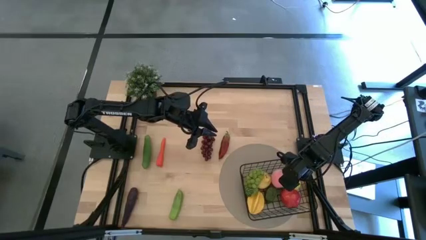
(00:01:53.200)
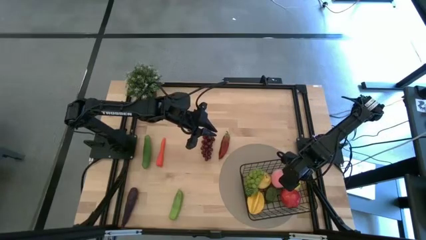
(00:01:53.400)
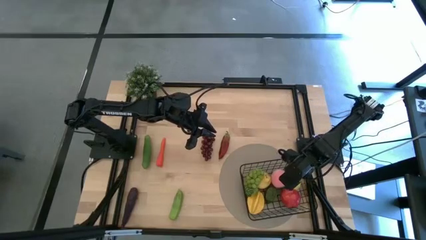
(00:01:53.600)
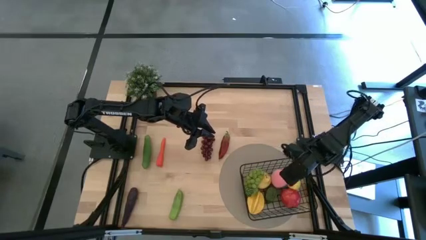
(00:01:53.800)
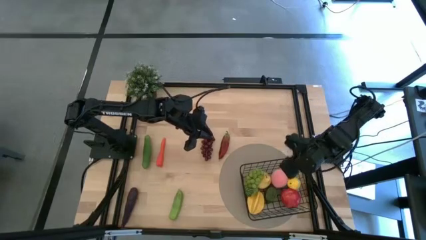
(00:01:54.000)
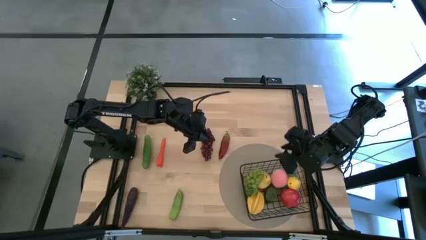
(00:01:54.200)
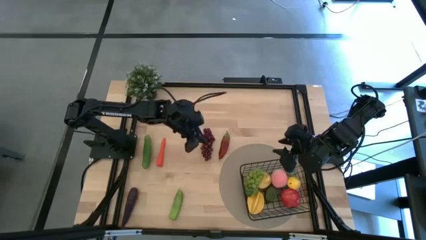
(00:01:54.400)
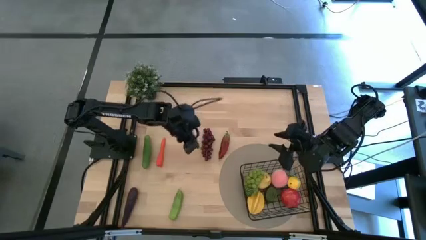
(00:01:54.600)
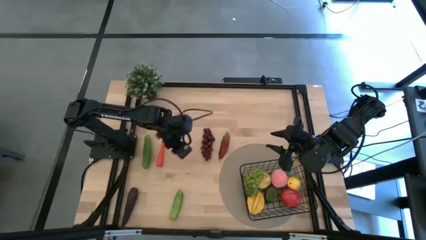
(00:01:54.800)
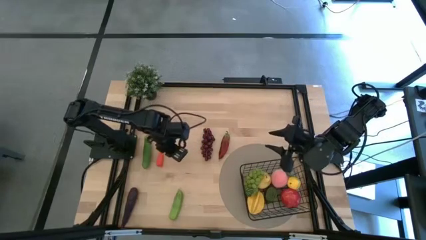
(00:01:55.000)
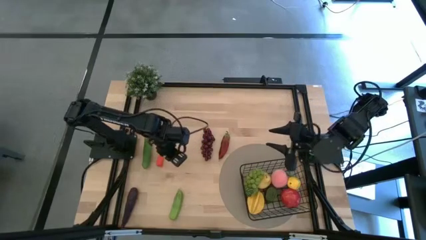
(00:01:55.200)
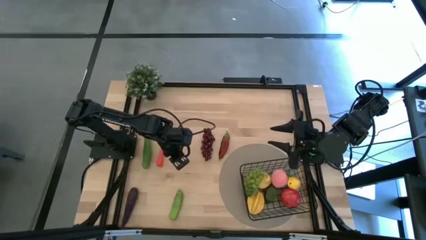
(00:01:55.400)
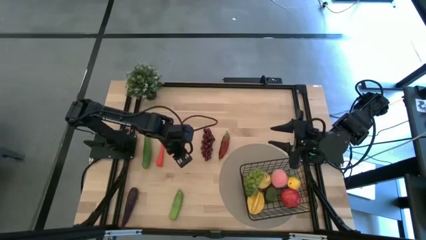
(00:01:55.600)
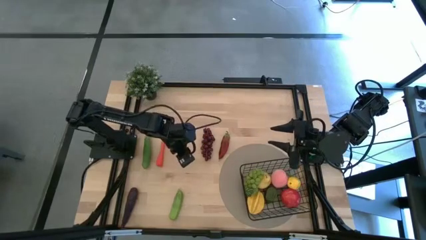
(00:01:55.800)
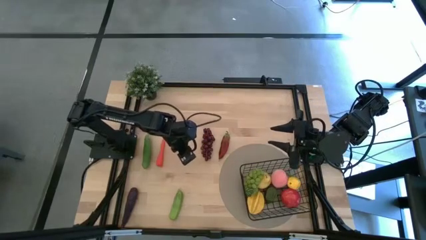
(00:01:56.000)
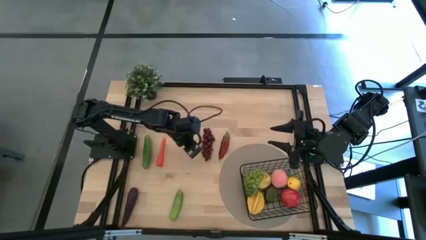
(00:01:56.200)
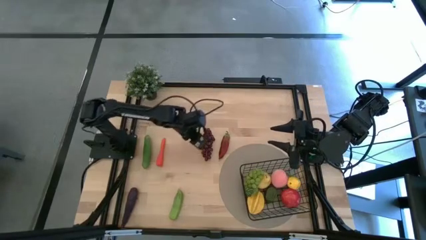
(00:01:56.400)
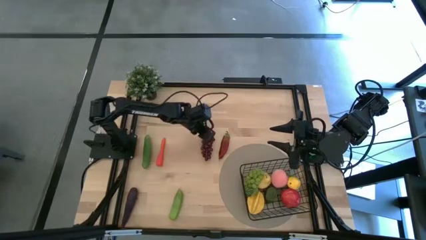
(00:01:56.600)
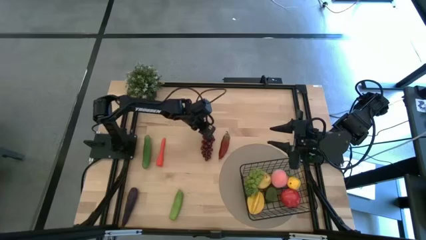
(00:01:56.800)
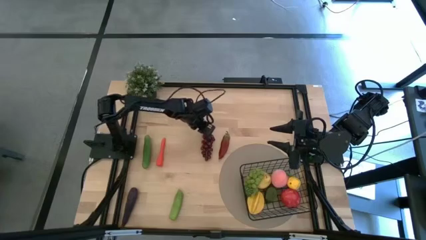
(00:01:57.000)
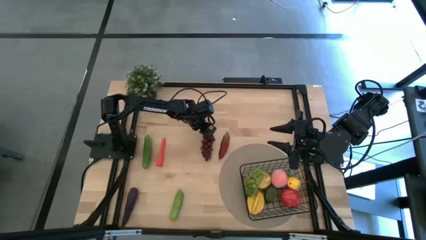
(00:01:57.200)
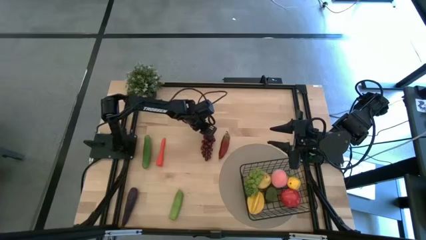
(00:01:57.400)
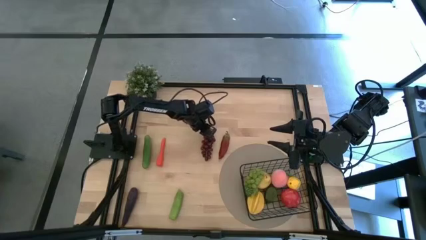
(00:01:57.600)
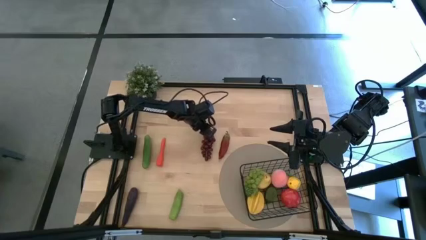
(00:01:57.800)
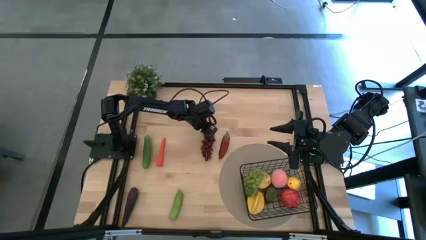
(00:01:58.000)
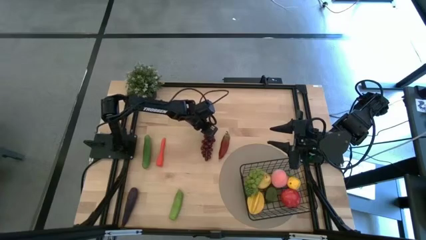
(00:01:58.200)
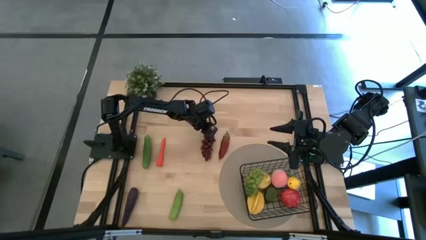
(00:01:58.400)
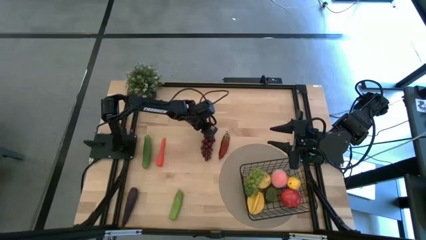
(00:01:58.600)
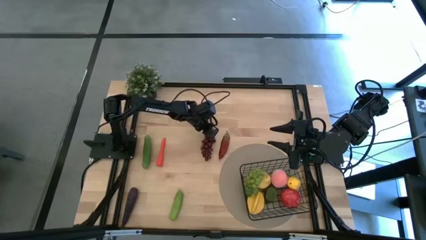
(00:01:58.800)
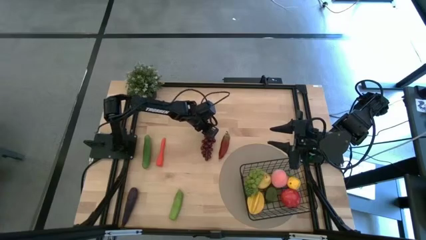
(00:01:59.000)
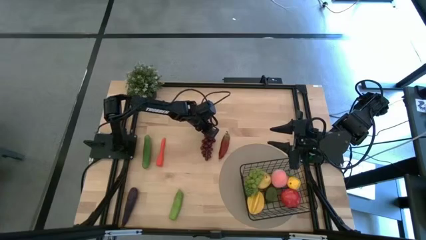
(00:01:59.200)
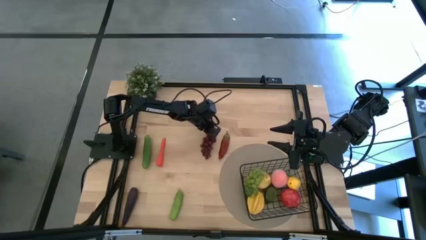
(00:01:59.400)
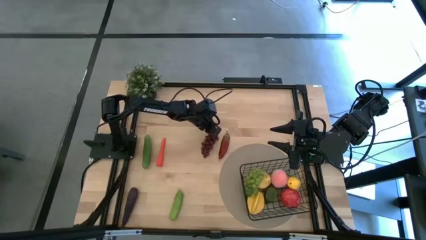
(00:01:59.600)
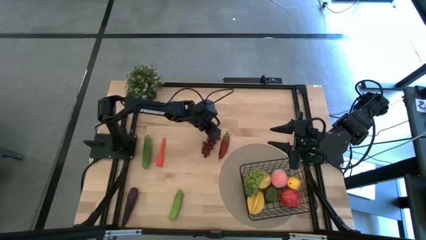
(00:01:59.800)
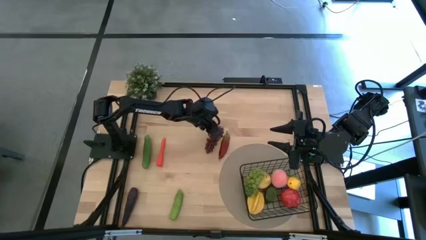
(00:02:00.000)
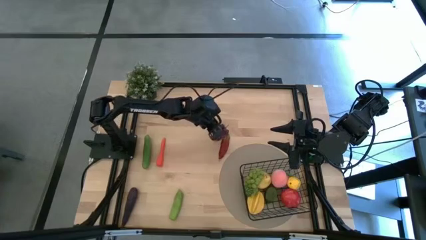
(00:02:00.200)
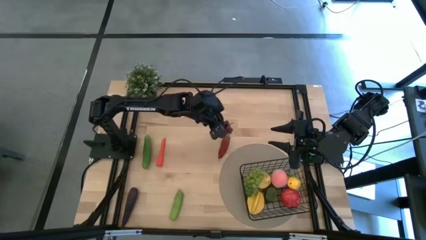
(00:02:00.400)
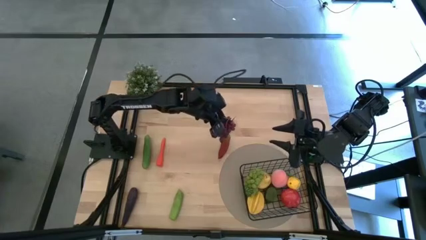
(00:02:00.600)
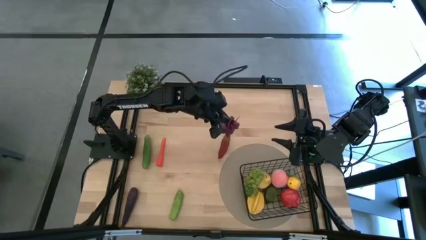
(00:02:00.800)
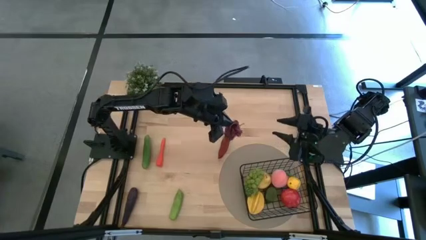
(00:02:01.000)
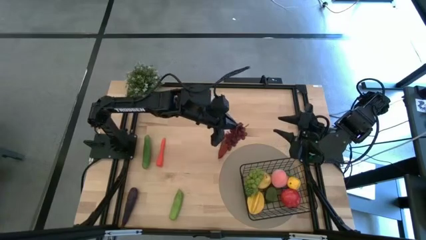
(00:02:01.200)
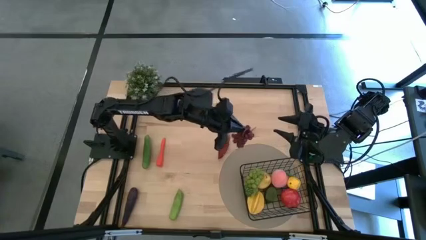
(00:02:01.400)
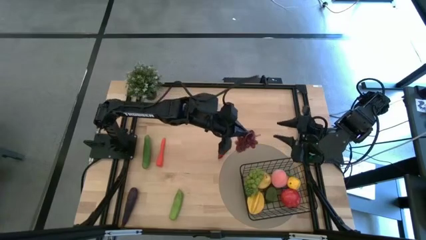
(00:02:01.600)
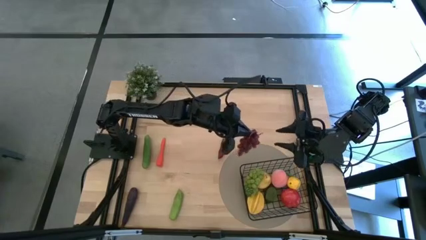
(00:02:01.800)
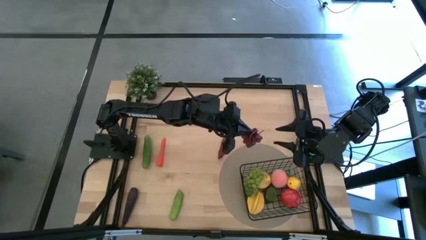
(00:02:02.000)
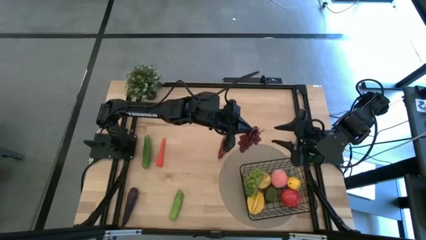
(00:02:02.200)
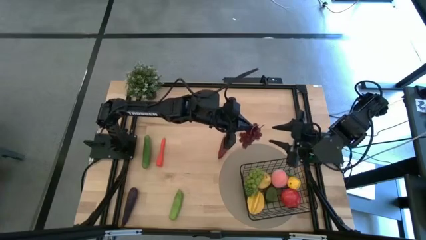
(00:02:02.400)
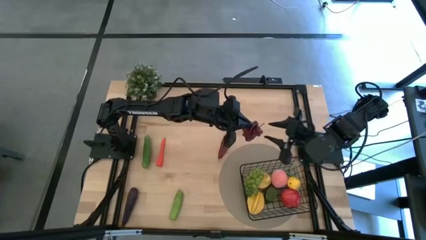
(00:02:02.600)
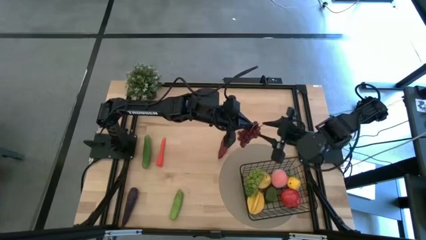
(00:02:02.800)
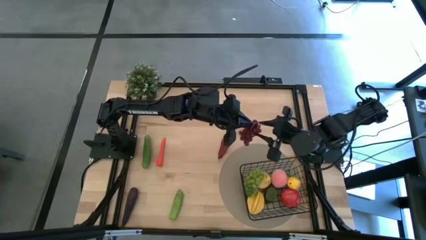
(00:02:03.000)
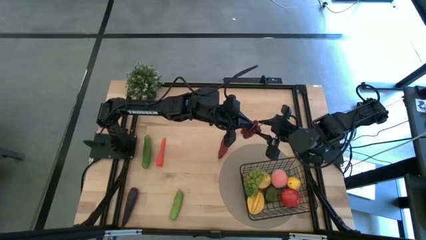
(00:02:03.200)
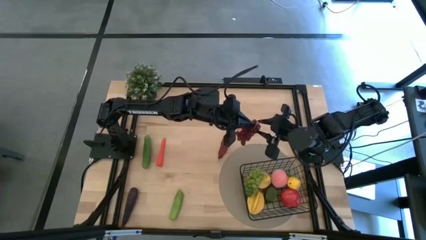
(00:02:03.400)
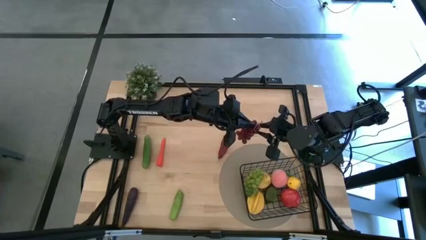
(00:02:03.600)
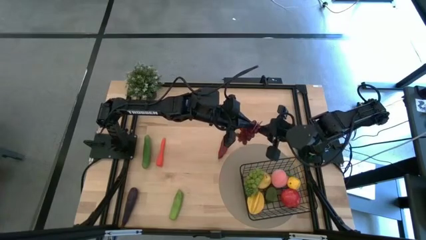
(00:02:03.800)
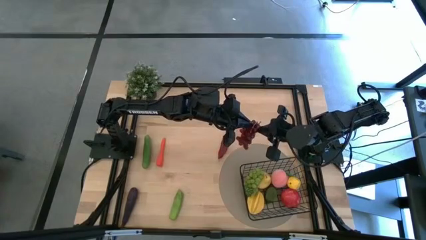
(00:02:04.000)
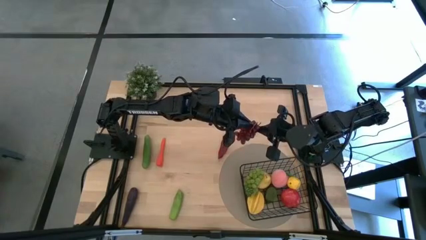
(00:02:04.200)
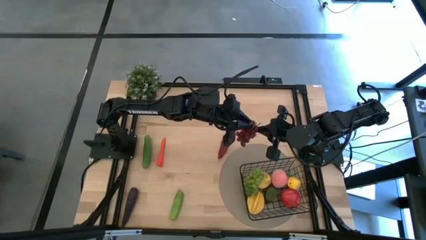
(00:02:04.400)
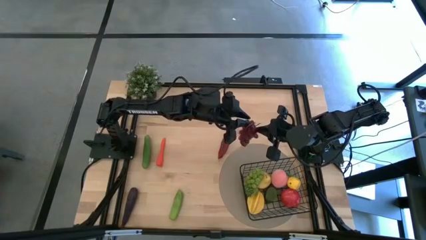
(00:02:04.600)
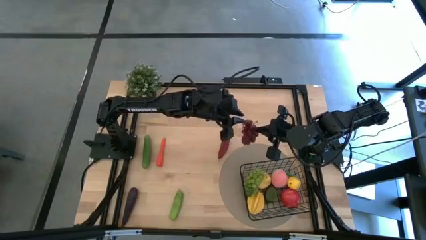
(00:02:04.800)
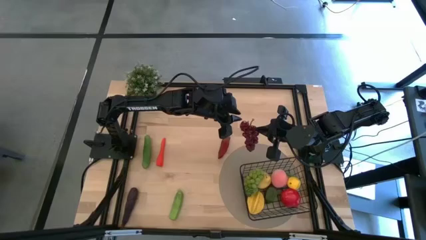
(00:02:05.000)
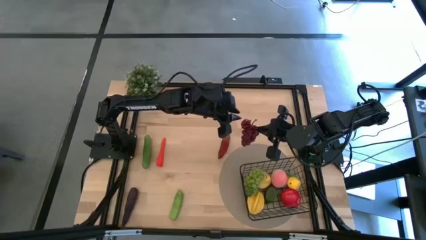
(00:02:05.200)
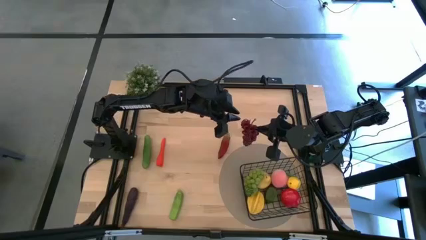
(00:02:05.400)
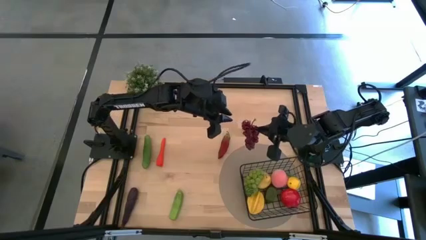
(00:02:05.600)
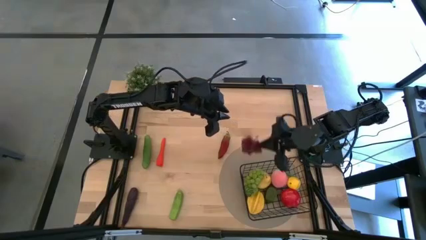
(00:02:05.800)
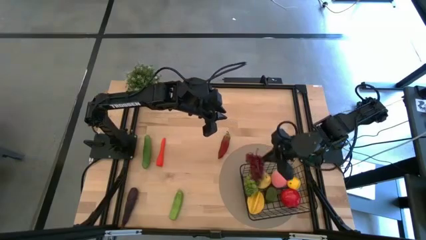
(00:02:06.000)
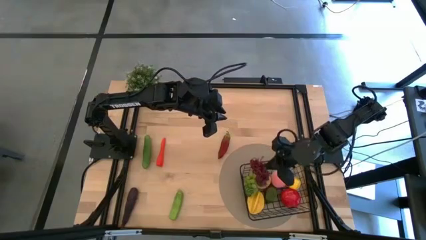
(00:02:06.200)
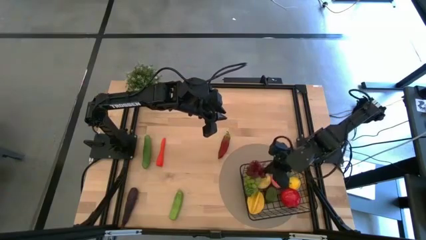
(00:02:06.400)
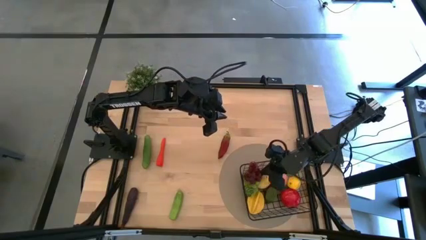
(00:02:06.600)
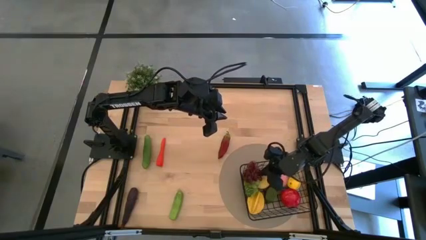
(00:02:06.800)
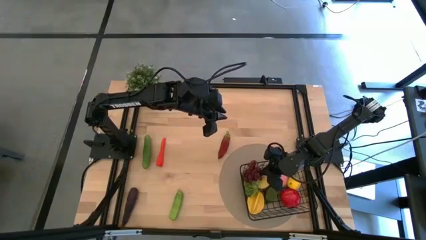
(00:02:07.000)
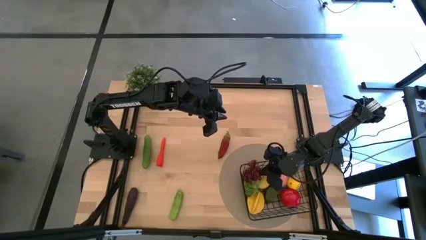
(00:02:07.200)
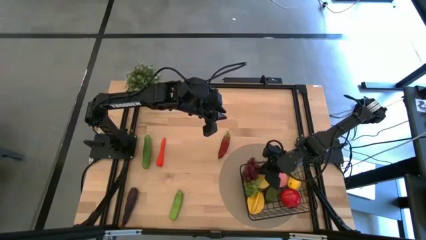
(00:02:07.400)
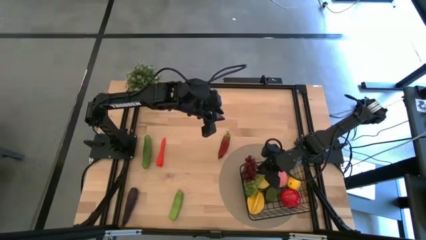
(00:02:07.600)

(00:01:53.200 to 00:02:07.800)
Task: Build produce basket
Put the purple grapes into the wire basket

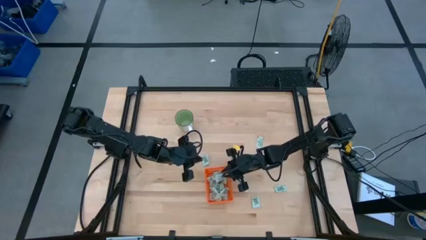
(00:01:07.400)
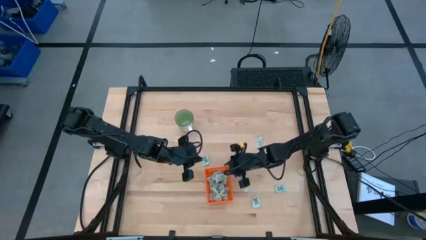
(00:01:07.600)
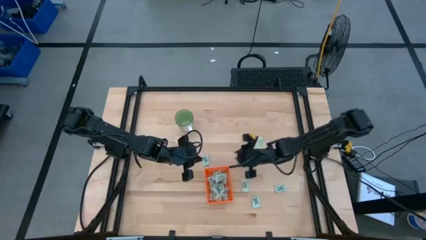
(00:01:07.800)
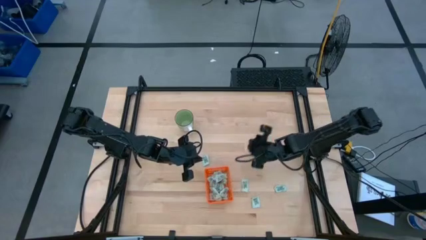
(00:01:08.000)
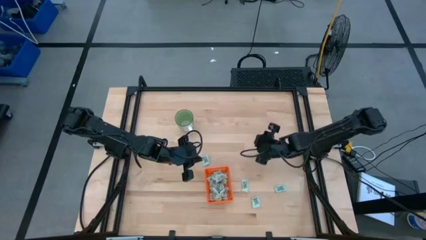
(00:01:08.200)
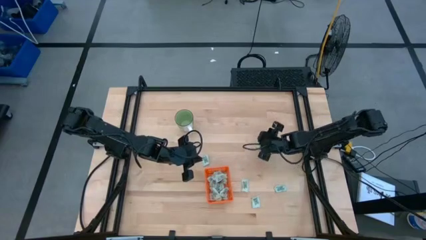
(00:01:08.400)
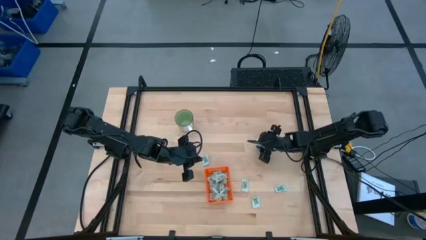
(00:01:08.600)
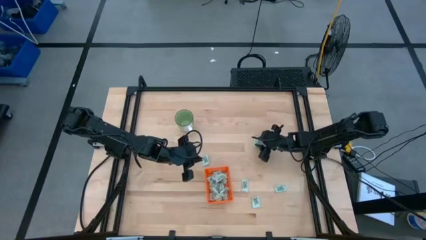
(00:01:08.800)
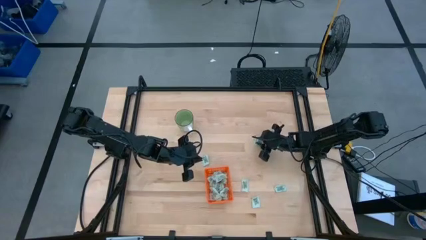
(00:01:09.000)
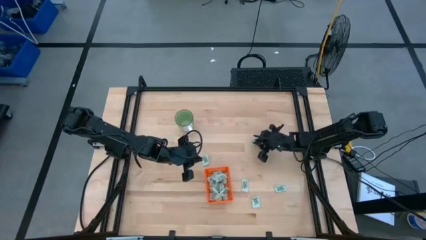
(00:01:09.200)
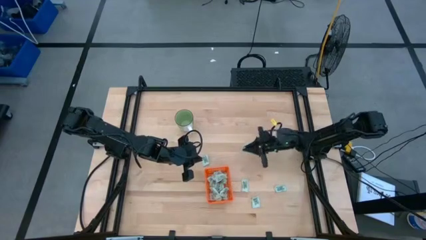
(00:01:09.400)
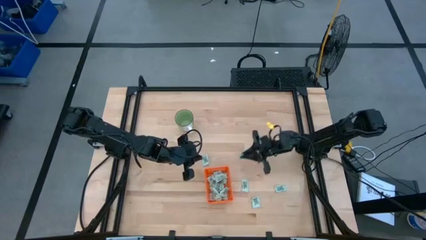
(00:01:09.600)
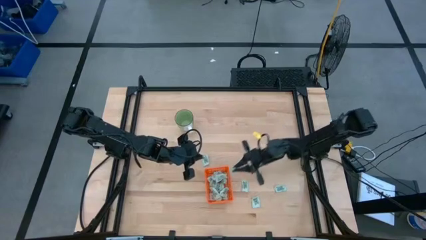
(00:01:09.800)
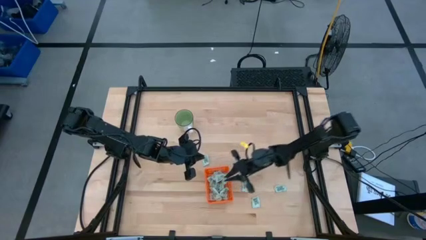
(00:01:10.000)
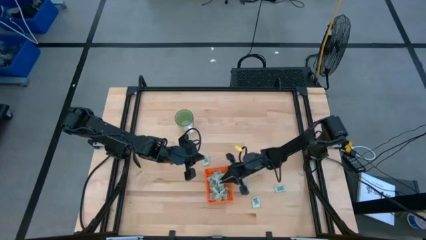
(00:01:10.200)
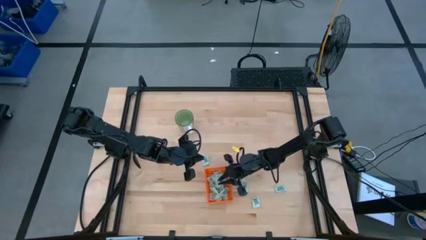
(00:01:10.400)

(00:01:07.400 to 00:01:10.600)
Task: Pick and place Stevia / Truvia into bins
Put the stevia packet into the orange basket
